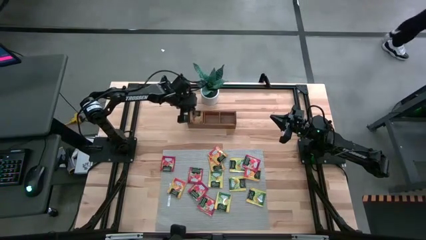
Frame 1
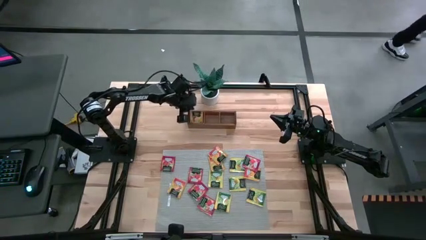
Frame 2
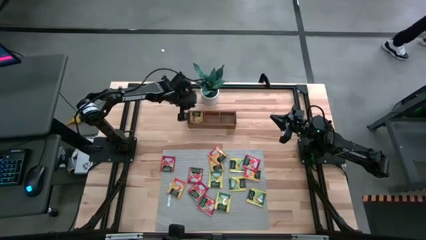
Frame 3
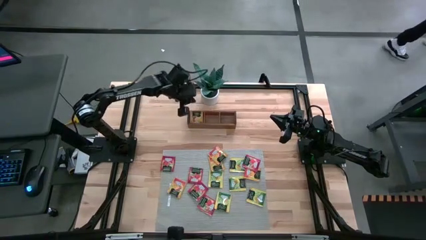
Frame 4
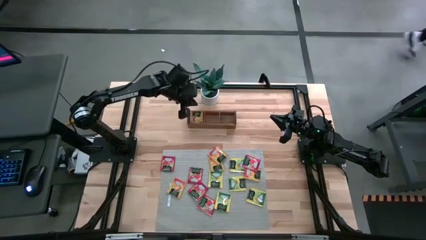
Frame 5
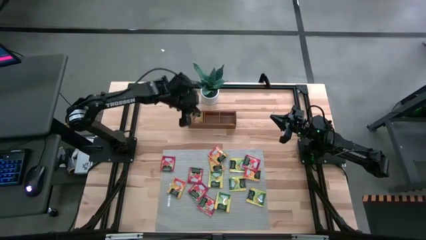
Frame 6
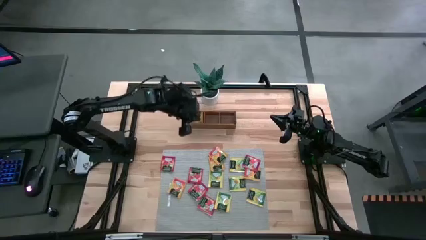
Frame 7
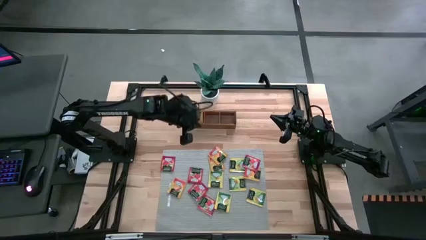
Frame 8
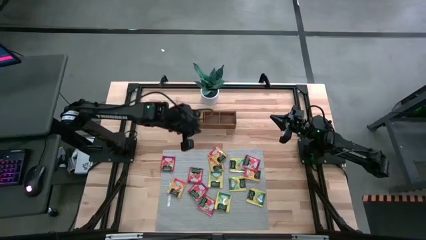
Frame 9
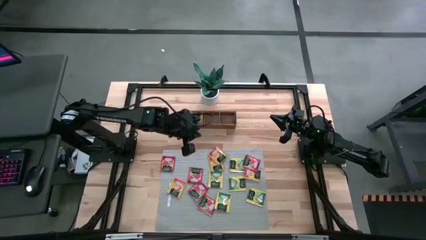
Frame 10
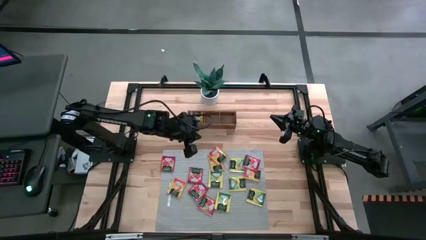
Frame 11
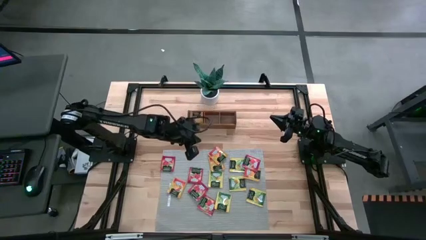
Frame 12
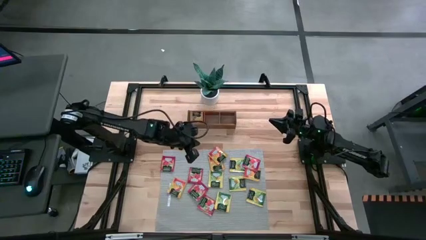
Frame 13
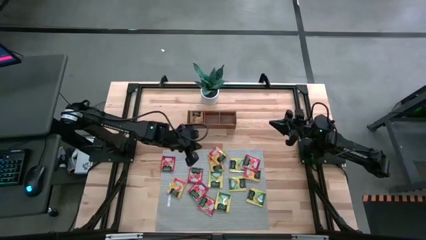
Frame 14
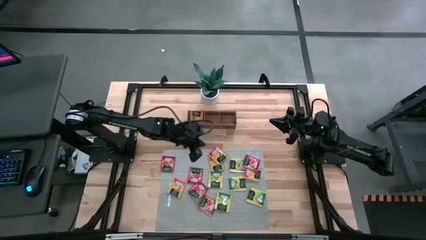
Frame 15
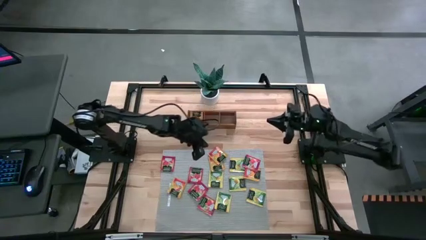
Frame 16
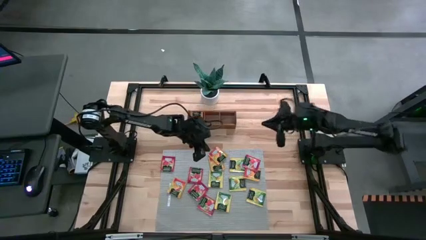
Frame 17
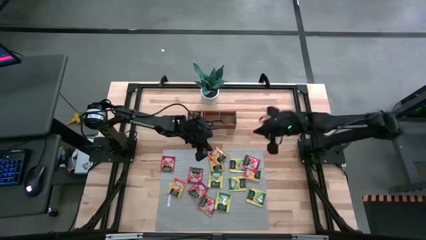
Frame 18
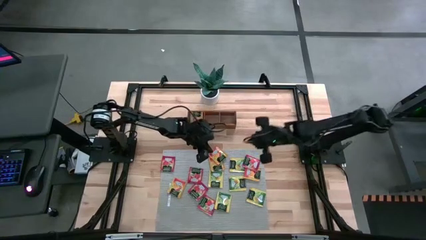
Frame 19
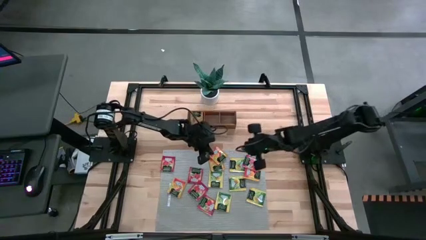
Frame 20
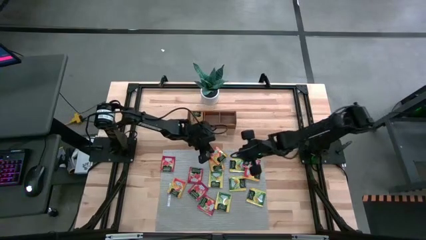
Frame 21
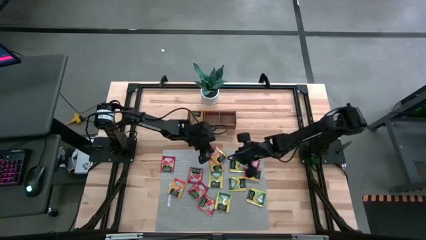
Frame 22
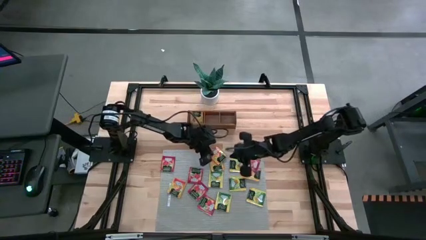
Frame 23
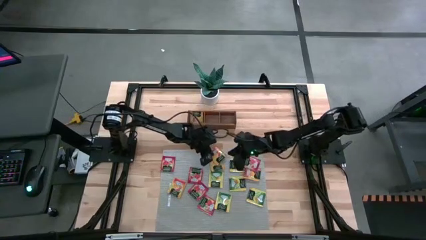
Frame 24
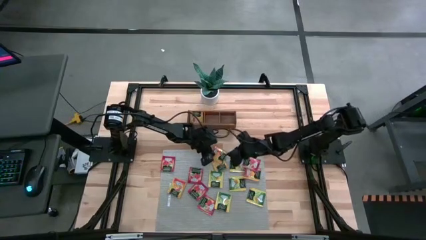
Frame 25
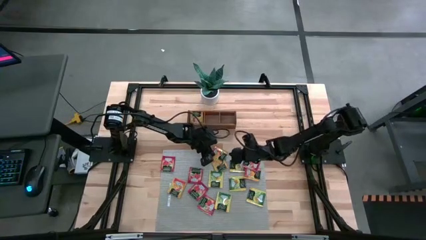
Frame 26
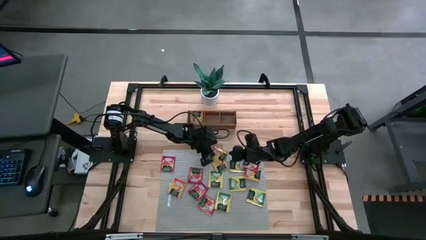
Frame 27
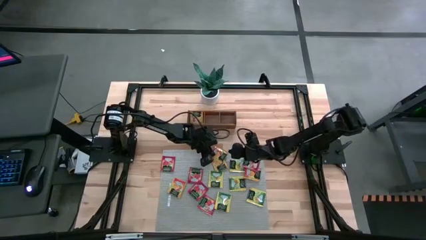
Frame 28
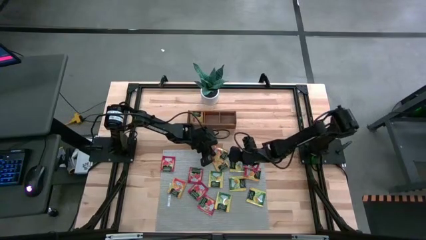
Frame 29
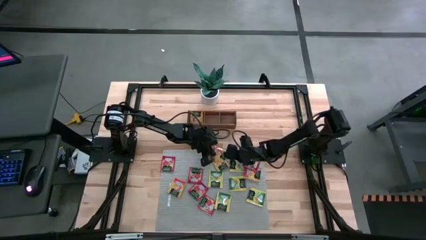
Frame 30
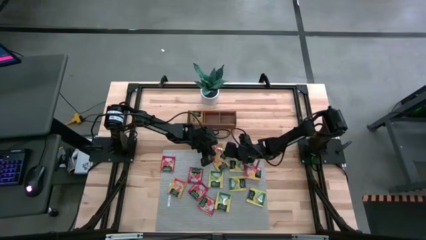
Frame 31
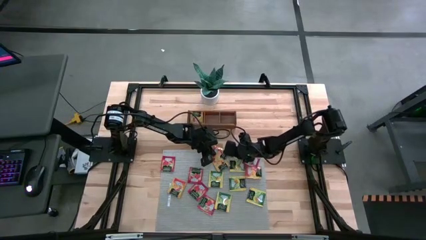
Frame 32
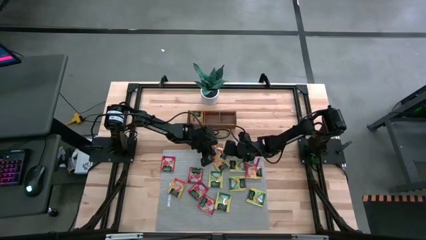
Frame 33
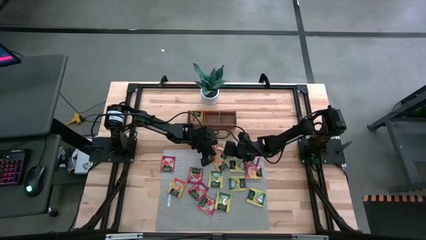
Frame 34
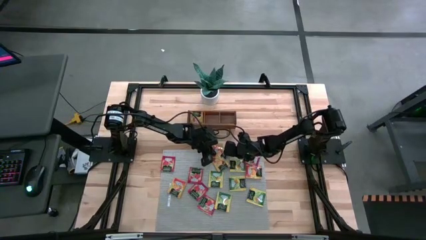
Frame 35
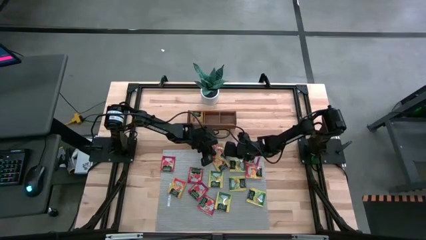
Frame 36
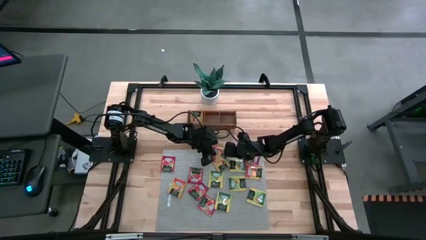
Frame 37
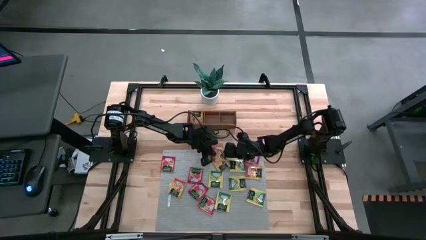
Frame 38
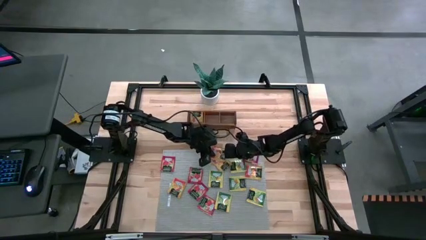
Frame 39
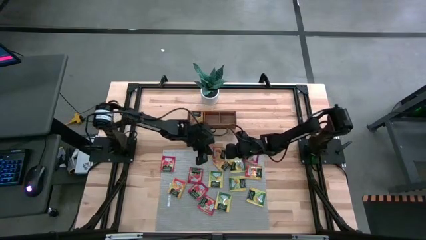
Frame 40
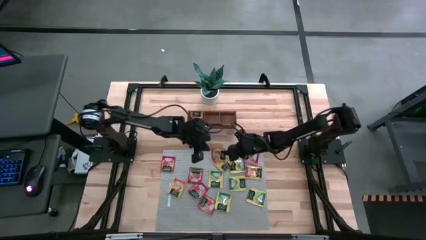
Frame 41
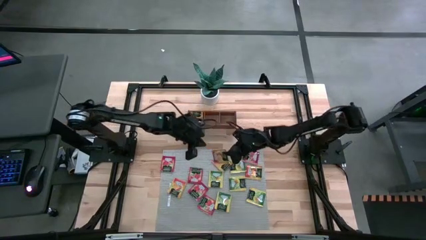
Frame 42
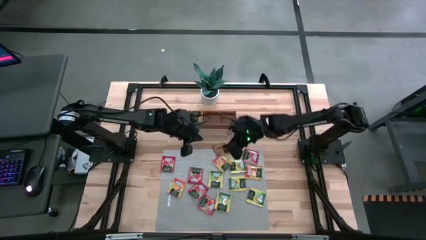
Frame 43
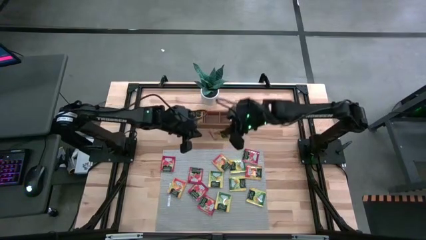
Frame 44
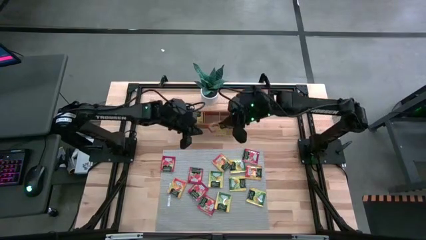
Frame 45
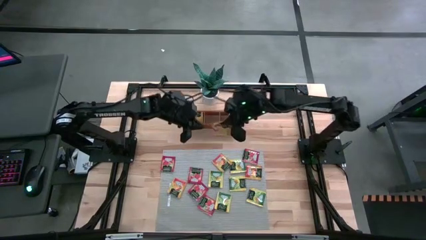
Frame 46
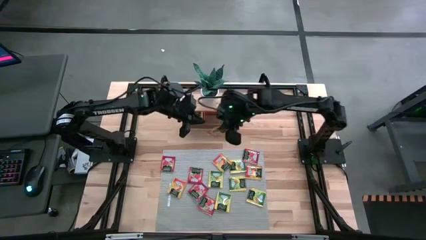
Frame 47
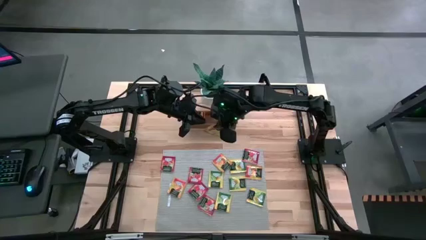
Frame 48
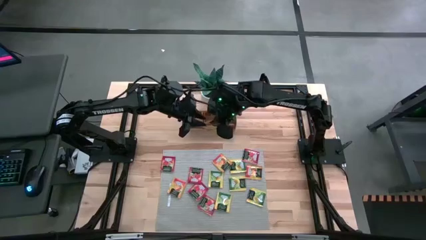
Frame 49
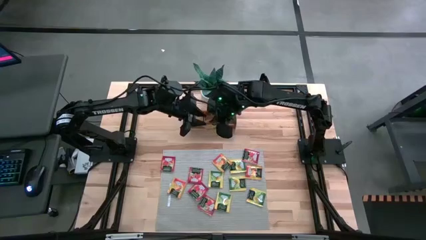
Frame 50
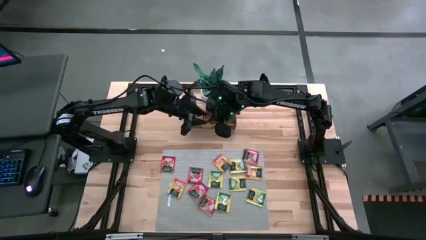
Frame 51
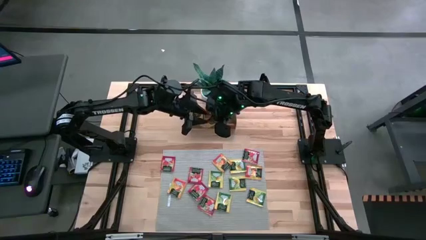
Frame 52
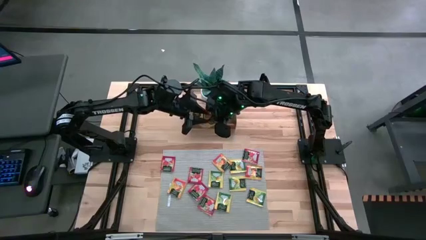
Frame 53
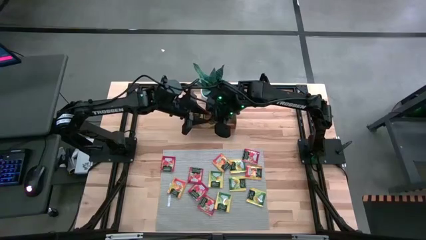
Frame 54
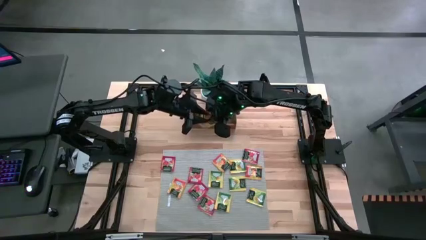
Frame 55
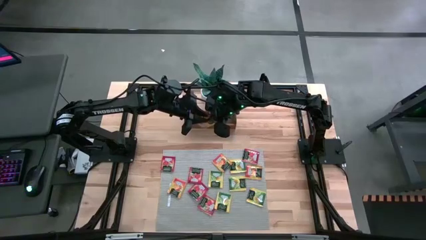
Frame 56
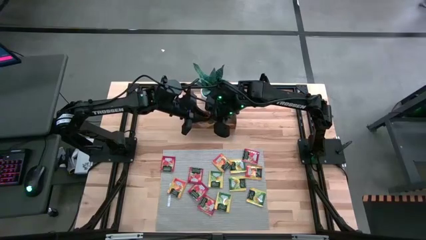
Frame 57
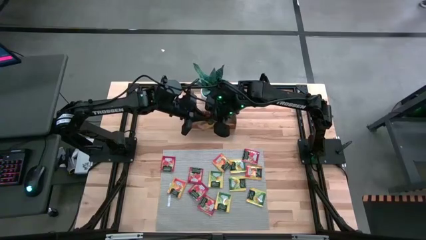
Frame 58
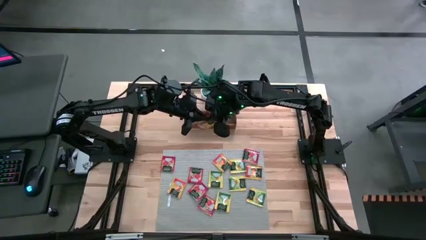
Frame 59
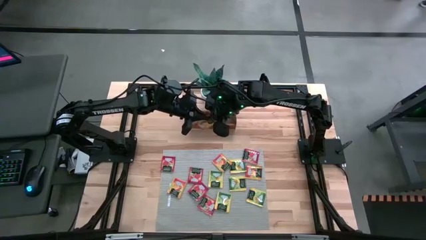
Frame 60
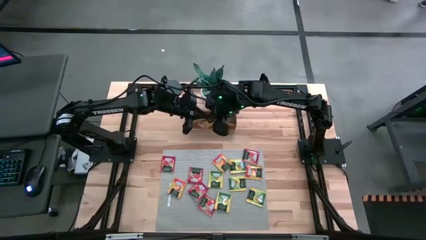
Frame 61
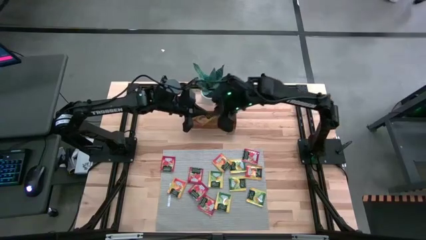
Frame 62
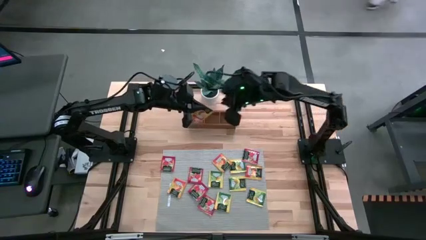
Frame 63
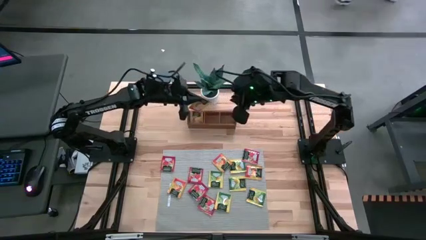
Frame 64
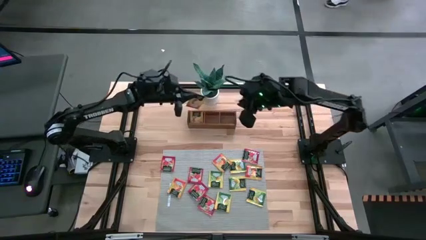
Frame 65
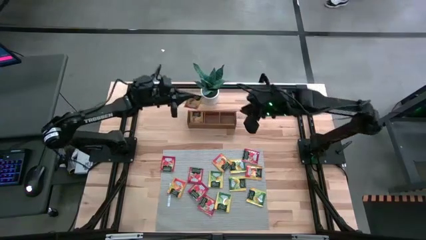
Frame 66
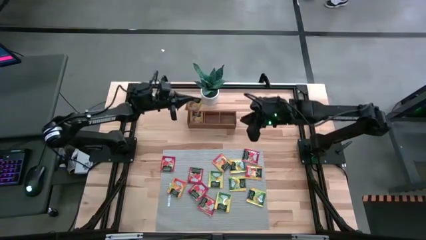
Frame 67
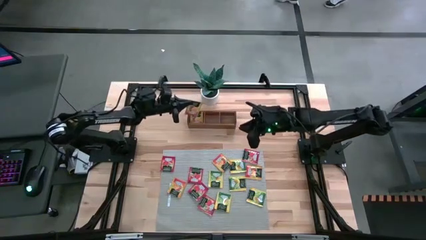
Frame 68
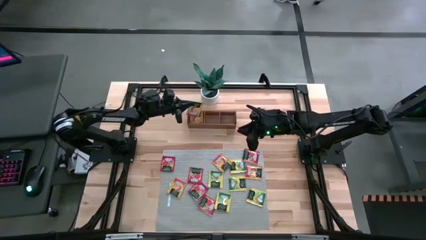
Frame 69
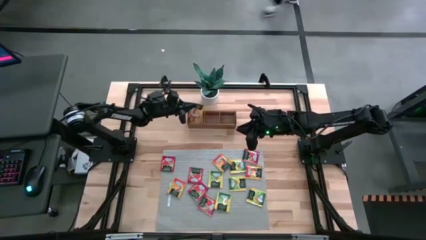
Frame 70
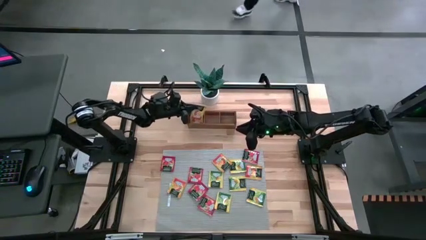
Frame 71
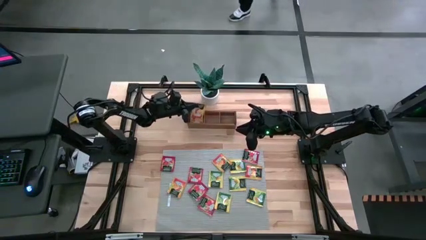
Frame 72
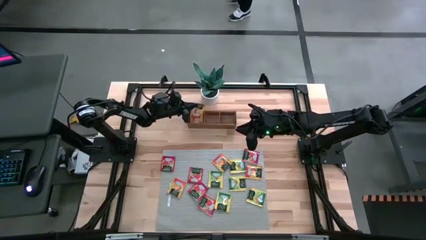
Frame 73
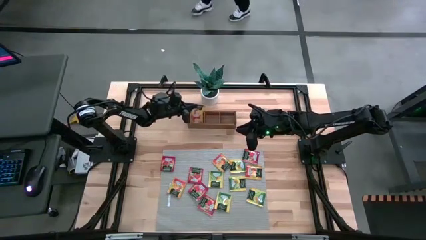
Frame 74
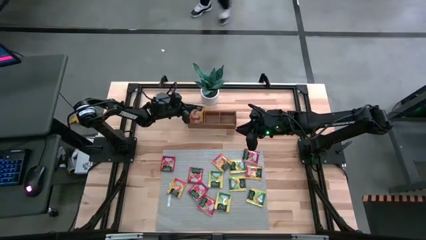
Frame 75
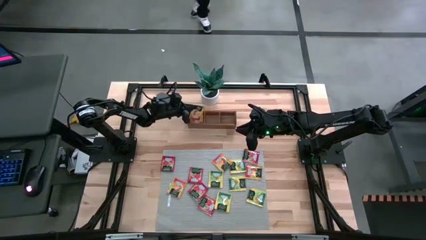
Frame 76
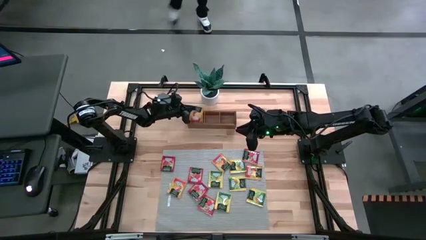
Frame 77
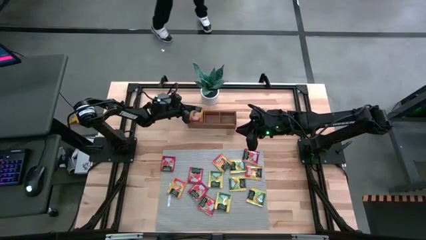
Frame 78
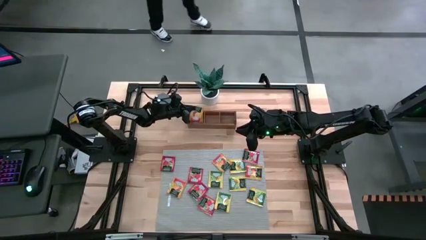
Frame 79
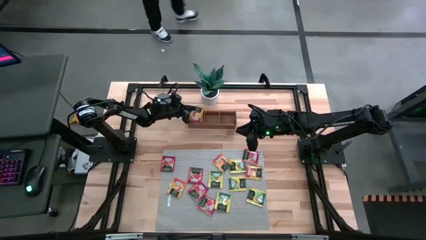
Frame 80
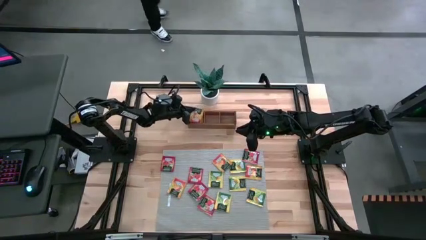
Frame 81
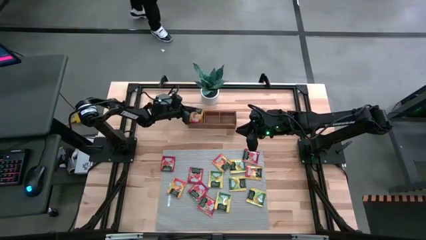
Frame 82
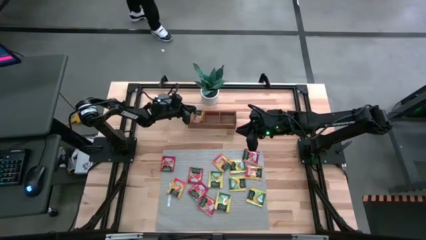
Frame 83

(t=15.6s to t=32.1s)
Task: Pick & Place Tea
Put the orange tea bag into the left section of the wooden organizer
